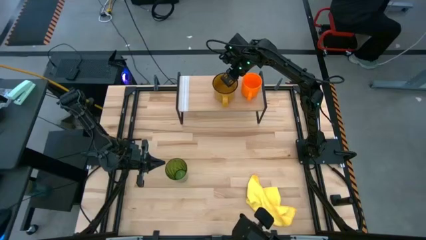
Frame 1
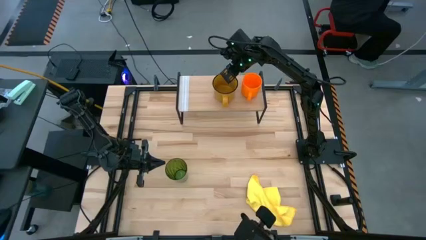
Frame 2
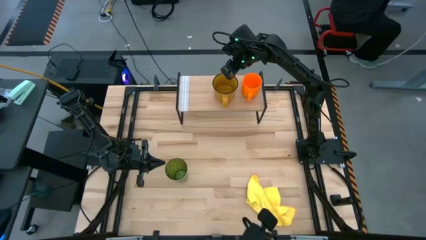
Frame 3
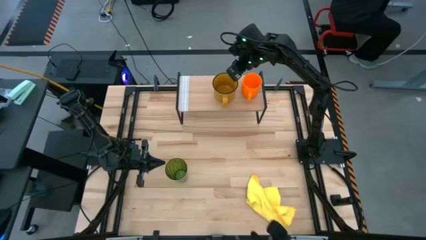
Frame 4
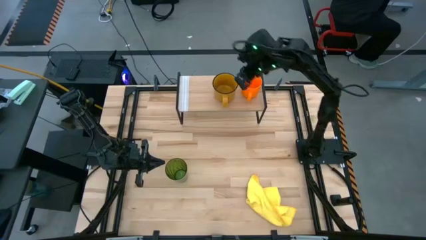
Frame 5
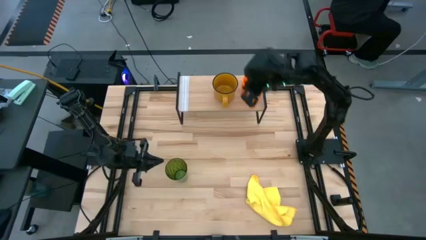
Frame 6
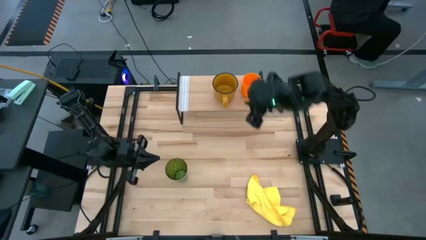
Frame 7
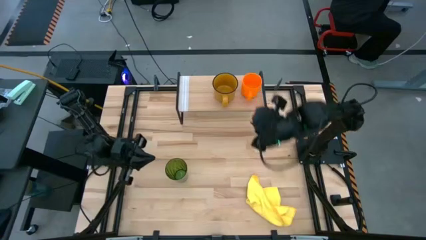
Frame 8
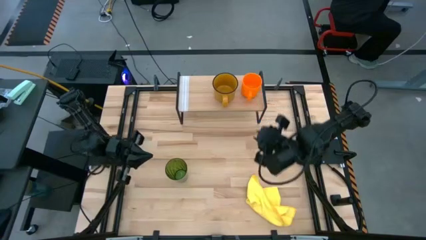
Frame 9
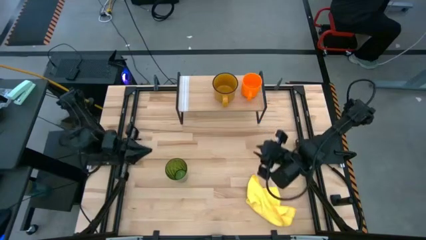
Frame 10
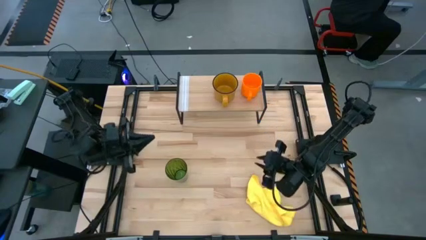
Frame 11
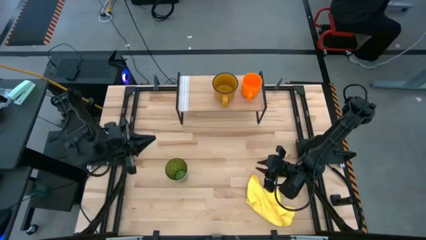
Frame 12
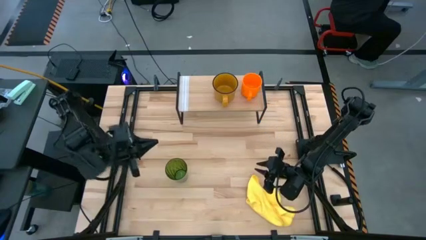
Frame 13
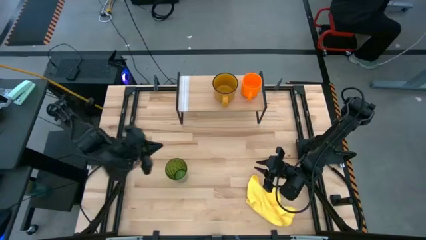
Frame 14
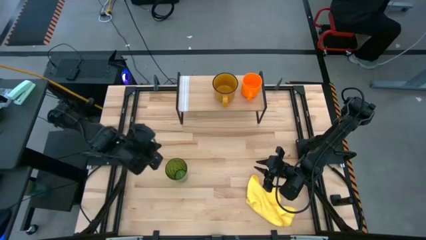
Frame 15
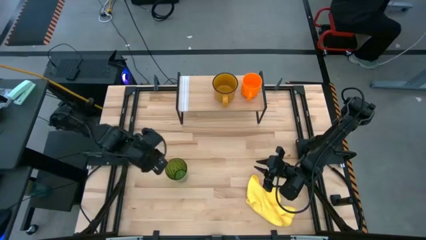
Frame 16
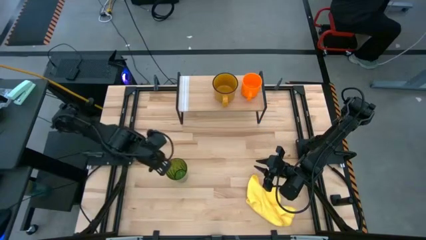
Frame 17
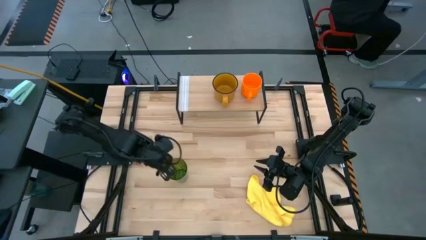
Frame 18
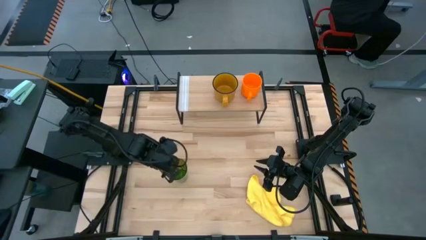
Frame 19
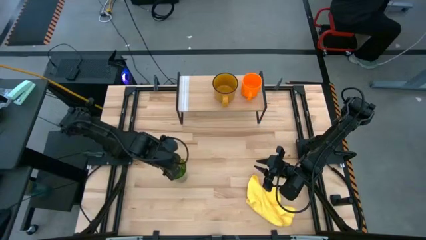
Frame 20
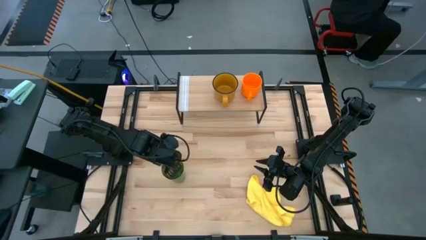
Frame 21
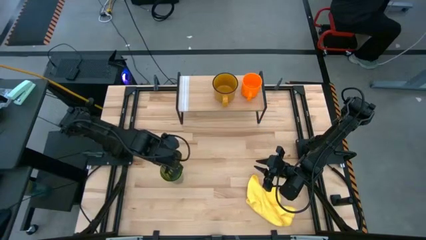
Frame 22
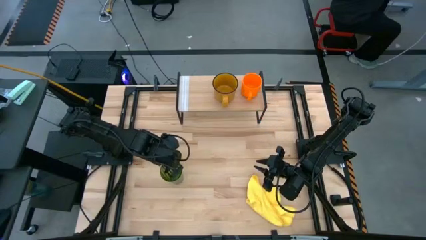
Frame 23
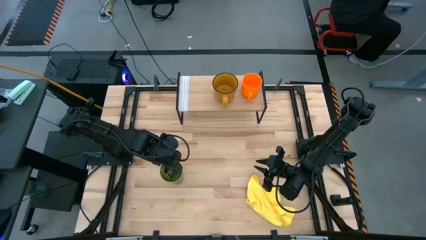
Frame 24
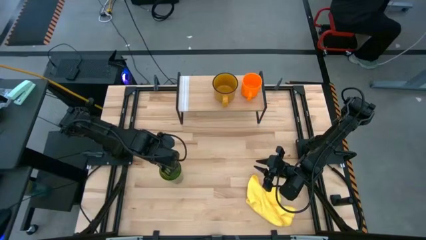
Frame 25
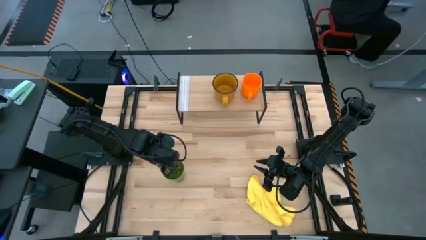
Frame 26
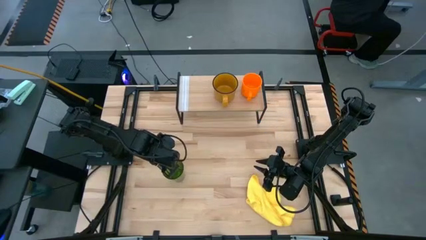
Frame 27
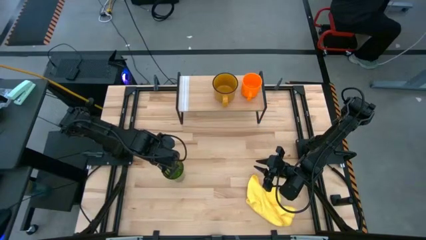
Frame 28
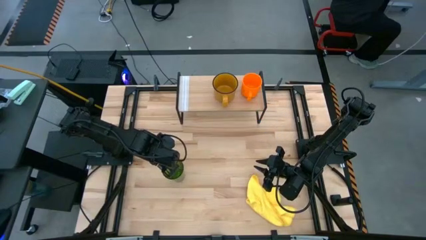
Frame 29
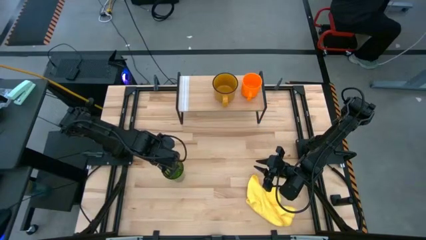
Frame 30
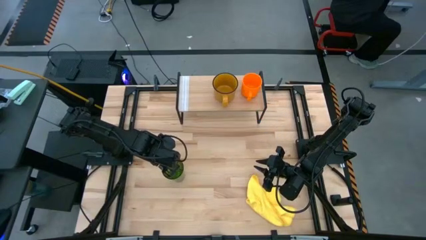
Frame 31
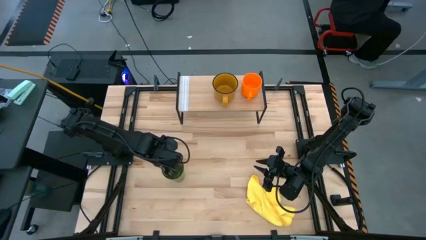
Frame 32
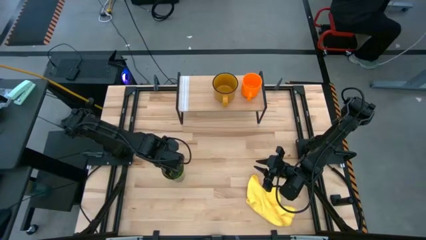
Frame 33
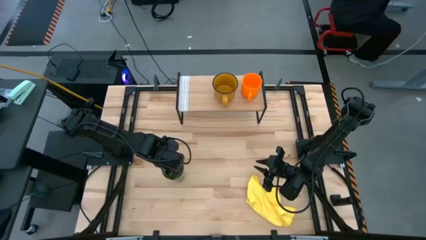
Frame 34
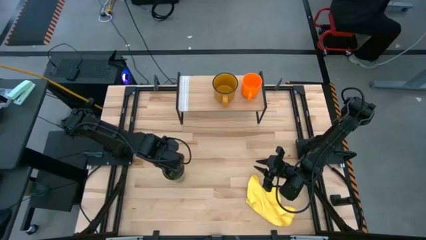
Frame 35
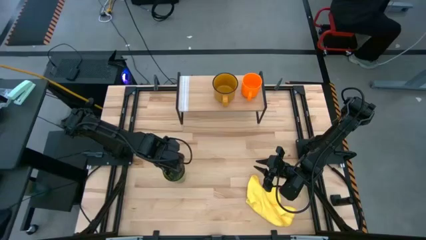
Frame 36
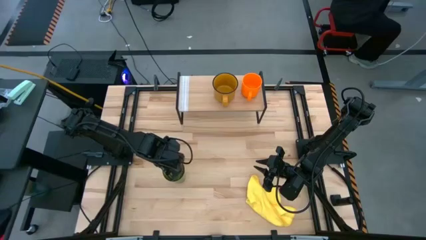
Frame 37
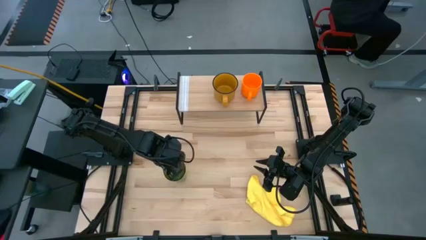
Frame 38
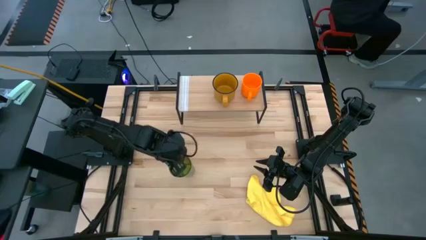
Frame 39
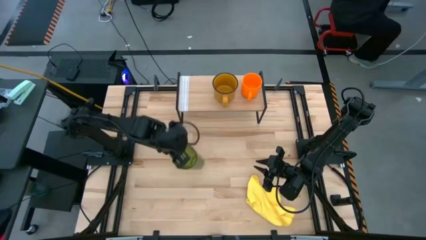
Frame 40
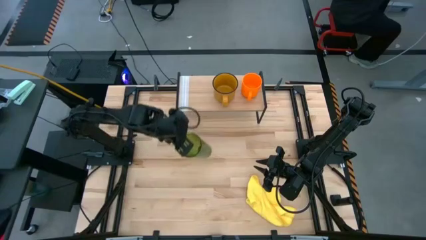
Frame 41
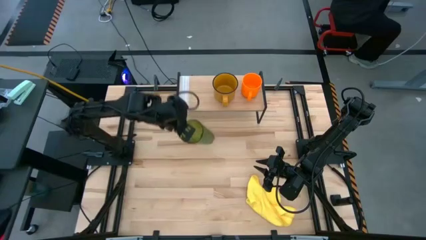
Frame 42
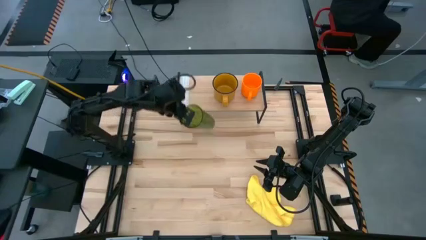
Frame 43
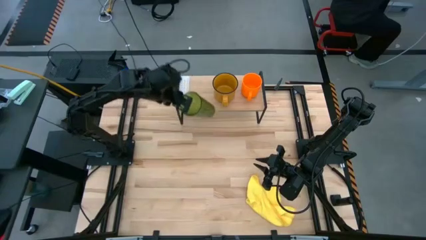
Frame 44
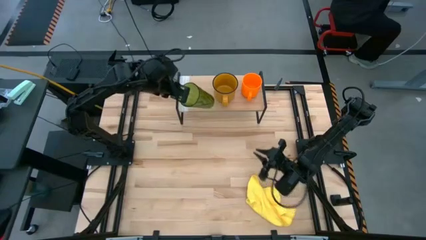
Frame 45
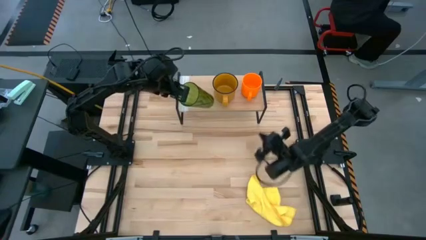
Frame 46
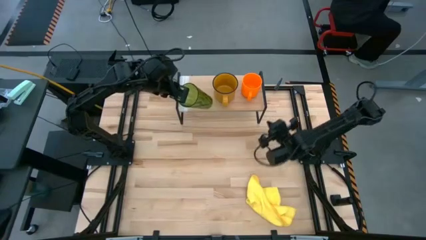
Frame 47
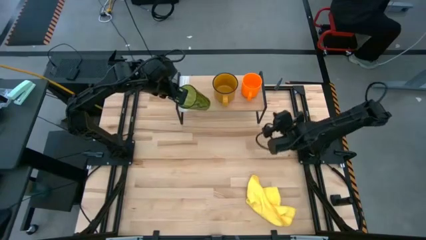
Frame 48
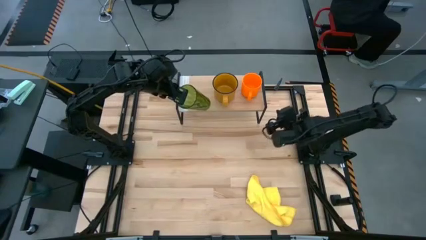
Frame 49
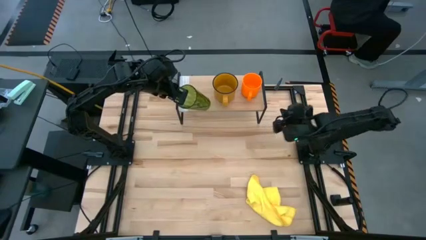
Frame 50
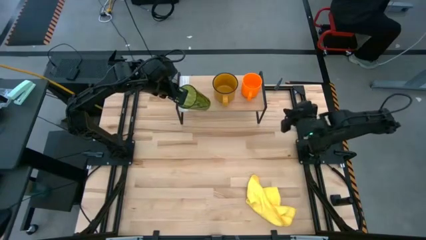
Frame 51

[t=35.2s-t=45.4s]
Task: Stack small to large cups/mugs on shelf
Put the green cup on the shelf
